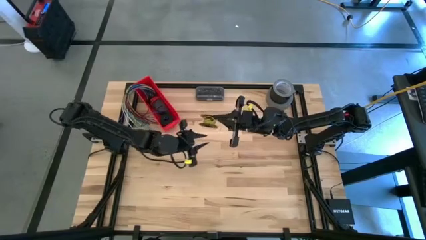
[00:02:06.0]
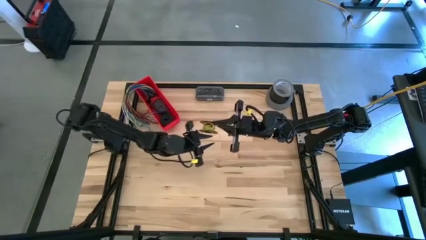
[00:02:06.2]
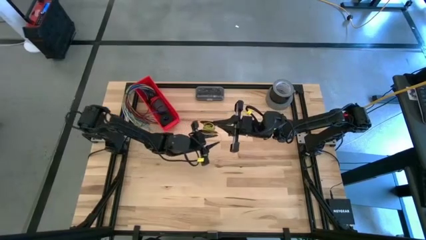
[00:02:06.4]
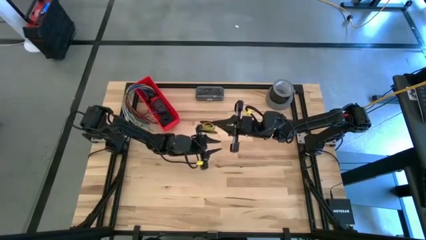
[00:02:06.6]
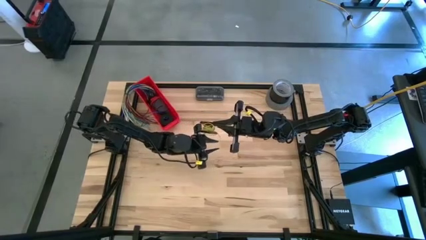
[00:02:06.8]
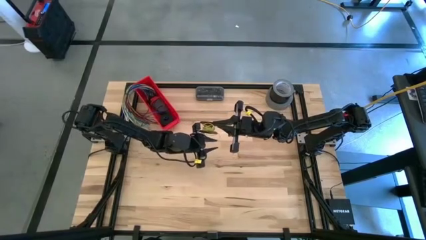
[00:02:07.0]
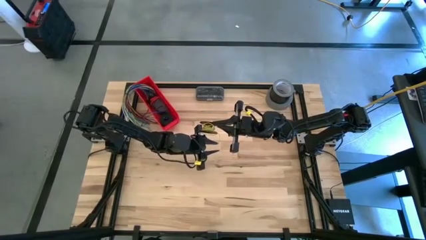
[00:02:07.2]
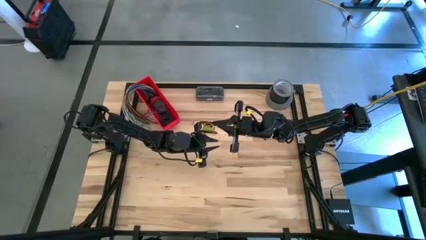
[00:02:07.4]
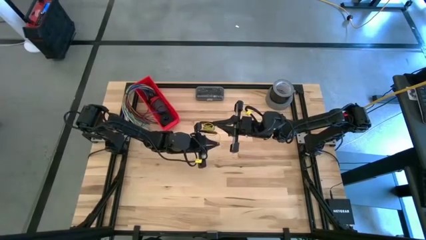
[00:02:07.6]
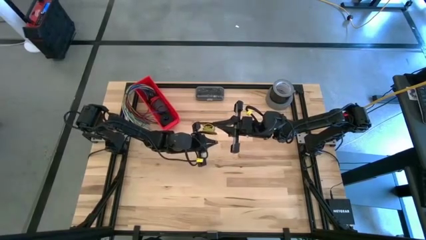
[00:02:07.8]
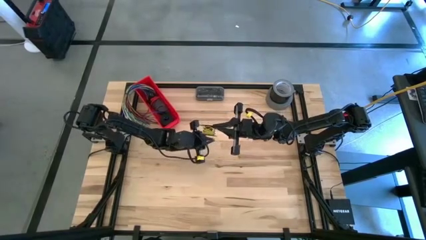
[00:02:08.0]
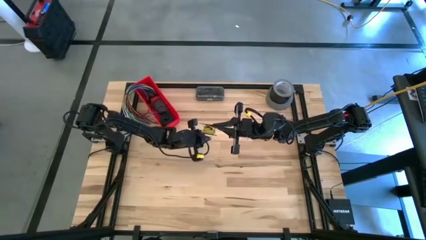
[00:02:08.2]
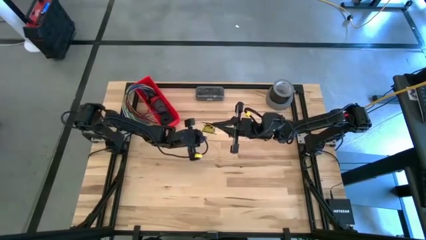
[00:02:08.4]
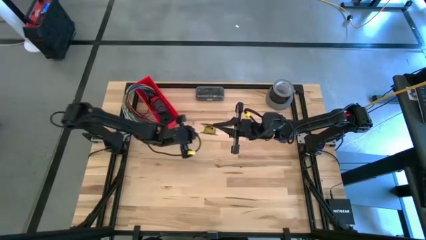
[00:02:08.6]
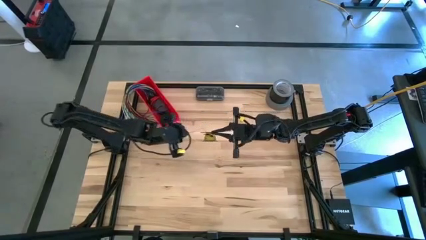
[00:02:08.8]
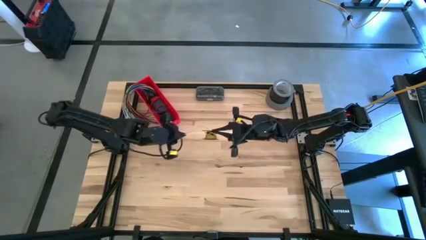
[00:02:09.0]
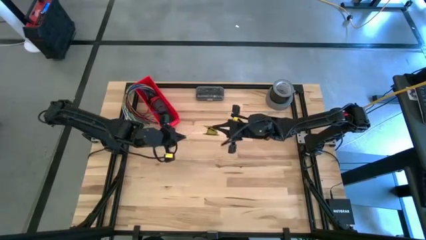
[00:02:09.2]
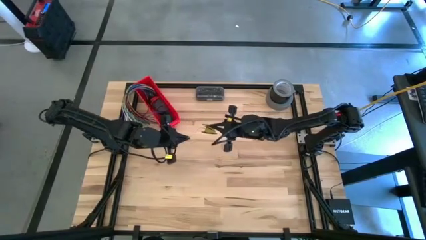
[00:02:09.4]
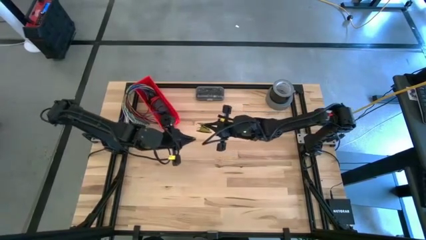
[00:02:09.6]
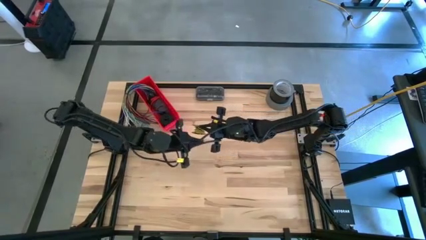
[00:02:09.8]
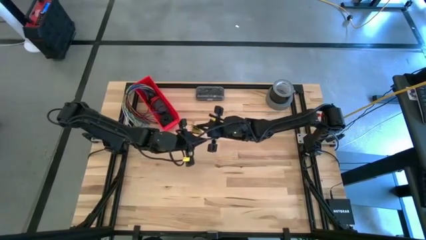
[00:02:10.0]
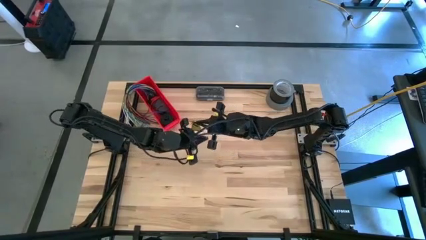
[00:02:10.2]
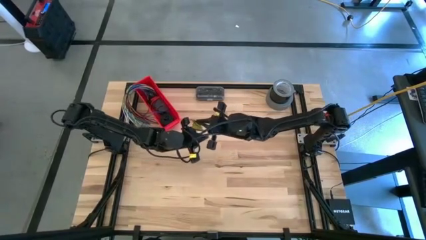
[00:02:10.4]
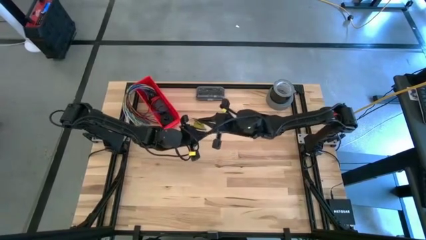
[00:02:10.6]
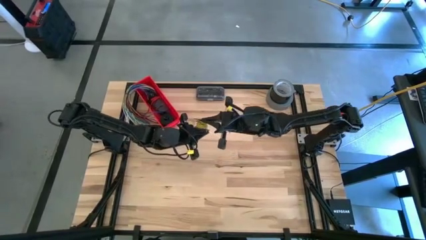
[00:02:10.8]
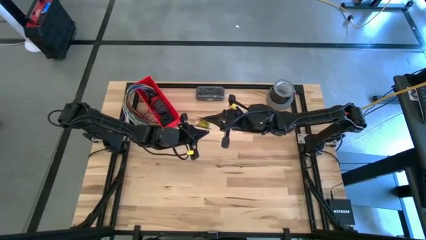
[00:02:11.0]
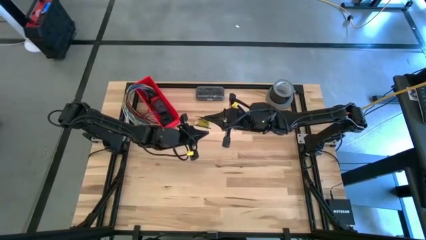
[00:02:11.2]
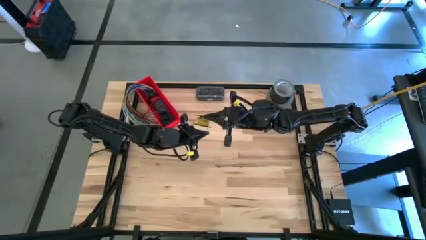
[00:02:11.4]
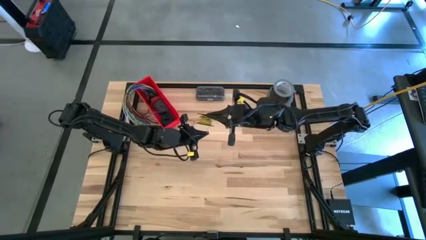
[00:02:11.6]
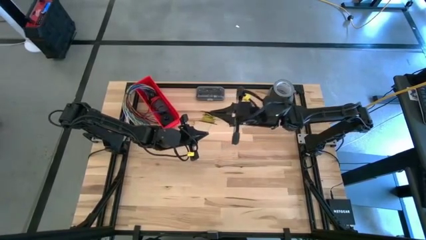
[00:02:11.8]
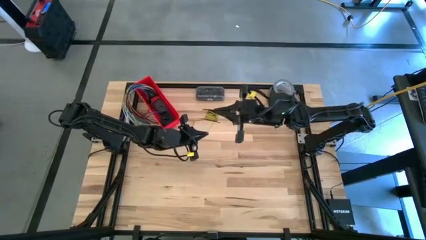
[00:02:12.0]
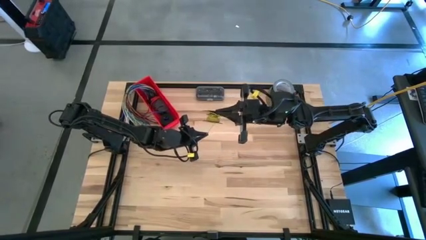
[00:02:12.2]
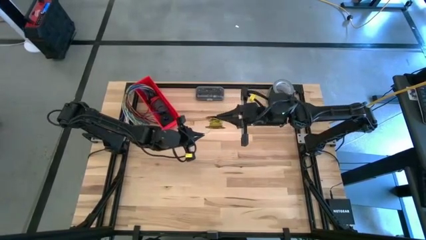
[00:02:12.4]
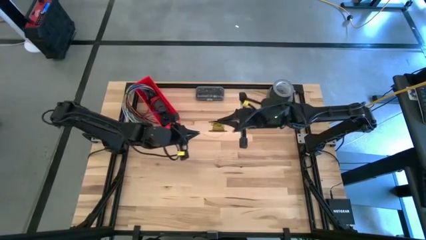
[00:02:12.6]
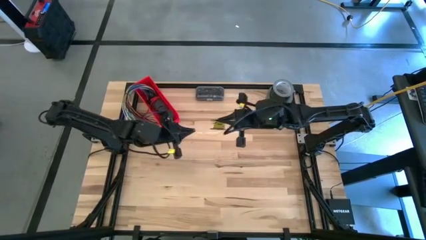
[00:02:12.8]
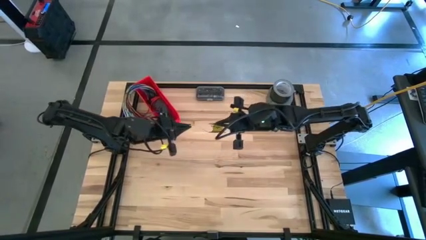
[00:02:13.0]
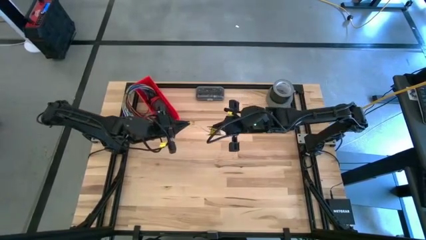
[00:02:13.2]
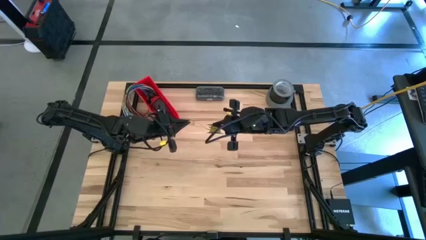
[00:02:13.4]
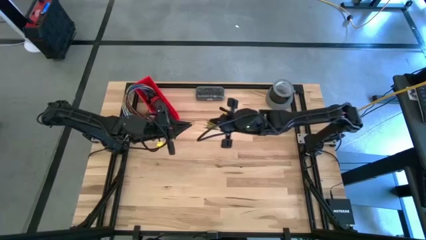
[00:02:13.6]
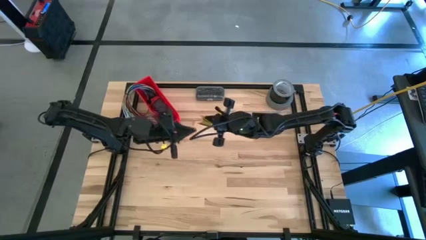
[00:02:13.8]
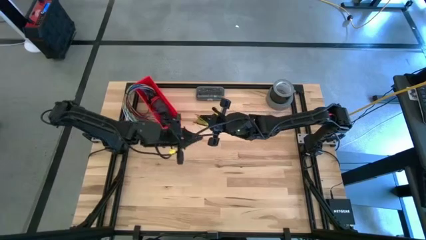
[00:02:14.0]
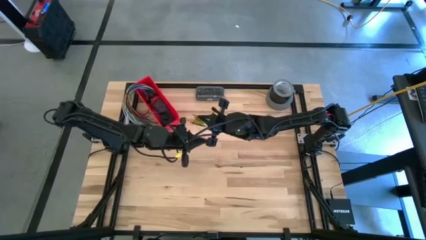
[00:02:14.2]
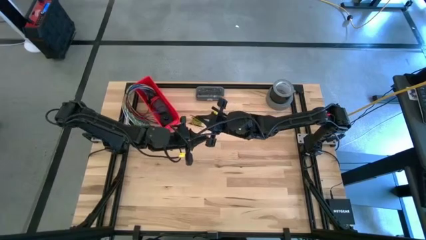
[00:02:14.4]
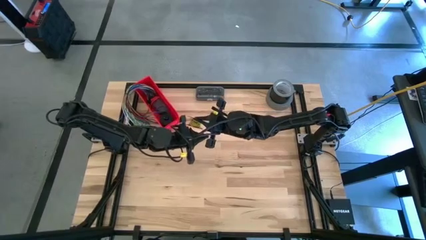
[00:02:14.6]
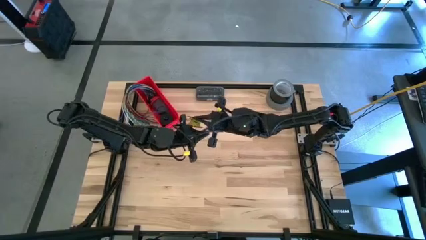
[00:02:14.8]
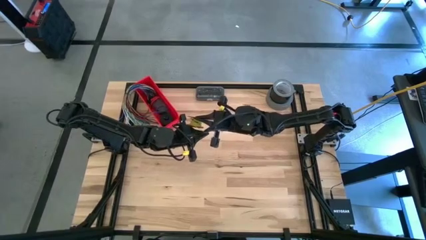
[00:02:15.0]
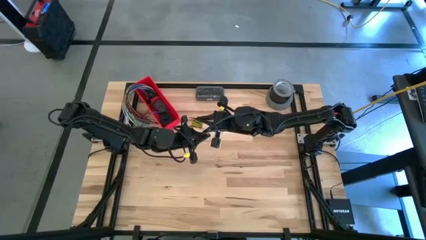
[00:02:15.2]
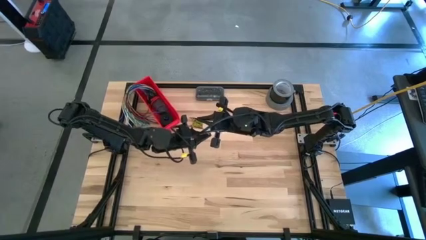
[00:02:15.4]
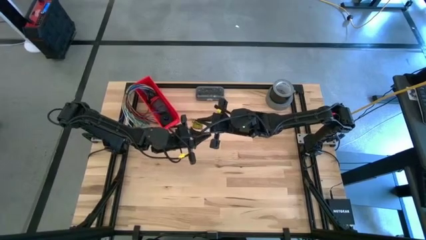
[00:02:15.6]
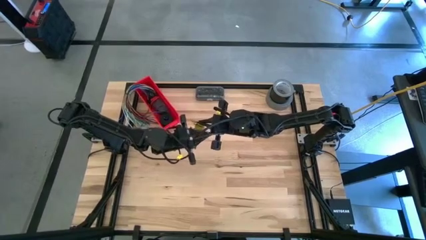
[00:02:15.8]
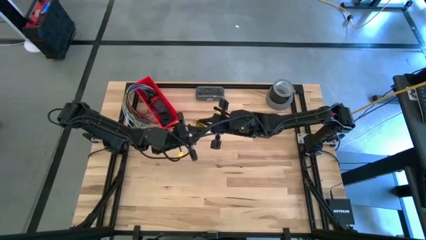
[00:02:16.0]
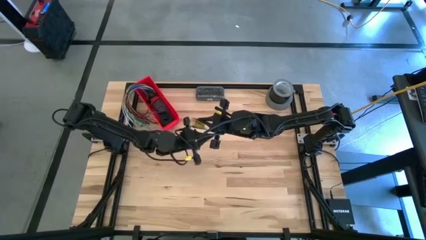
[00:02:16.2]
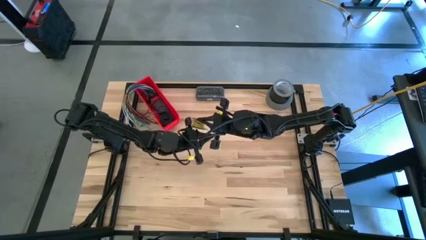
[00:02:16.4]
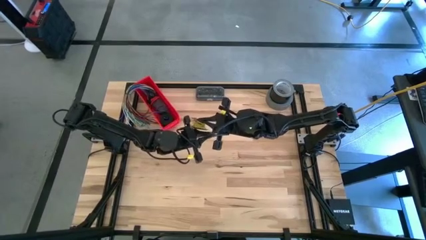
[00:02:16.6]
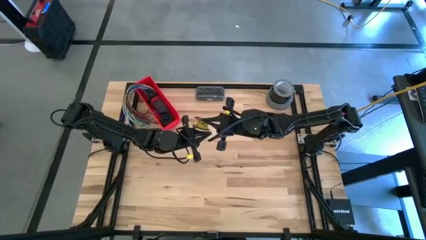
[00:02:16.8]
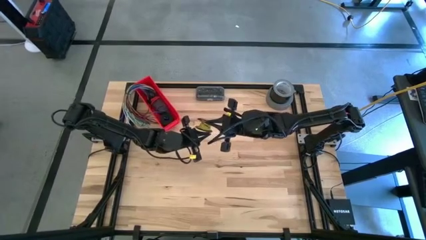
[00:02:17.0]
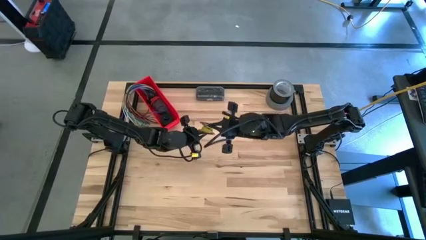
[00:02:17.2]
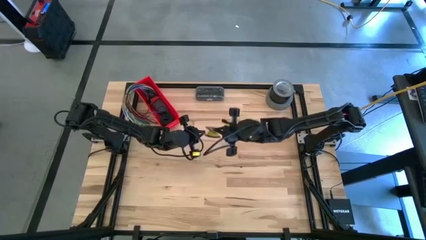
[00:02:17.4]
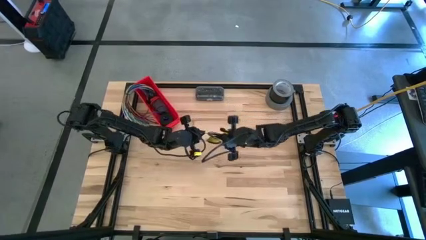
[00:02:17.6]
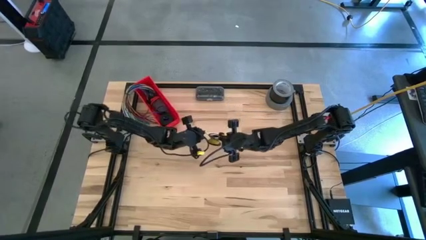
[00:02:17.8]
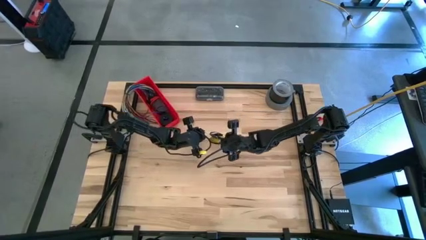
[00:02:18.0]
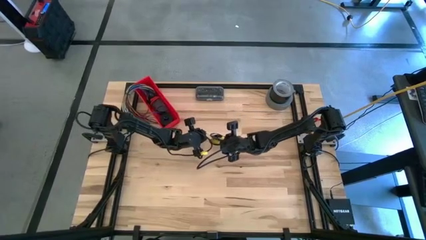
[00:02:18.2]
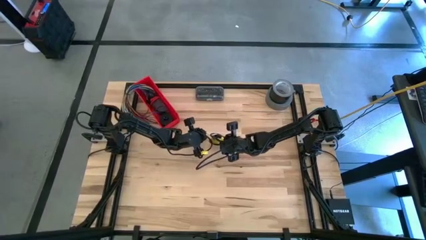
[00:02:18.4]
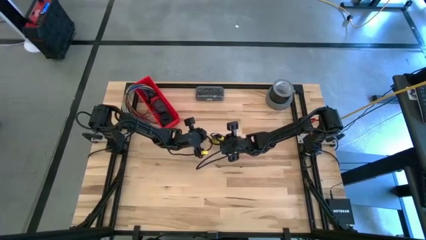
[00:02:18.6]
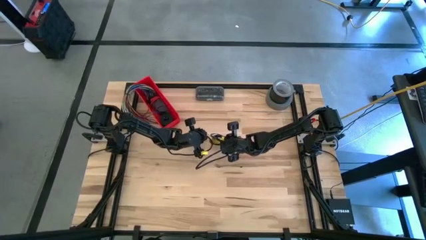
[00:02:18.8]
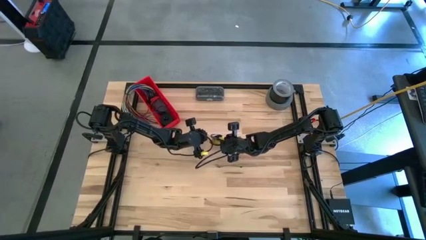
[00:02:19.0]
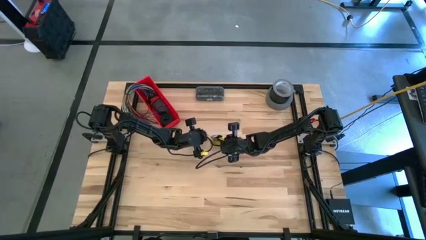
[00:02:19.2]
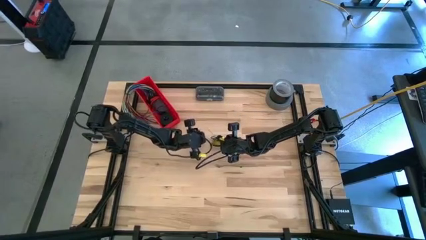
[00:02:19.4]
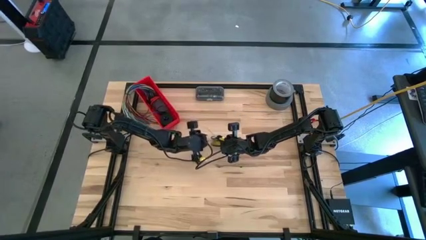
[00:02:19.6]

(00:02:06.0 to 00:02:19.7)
Task: Coil cords
Coil the yellow wire on the spool
